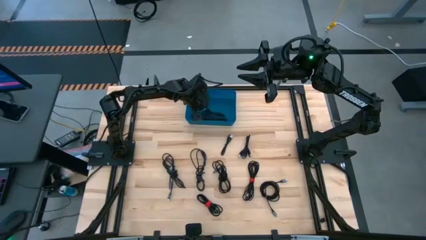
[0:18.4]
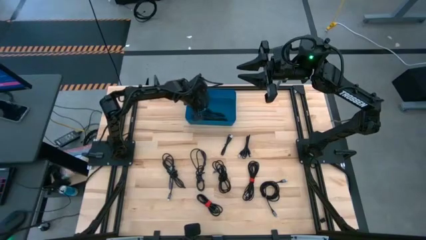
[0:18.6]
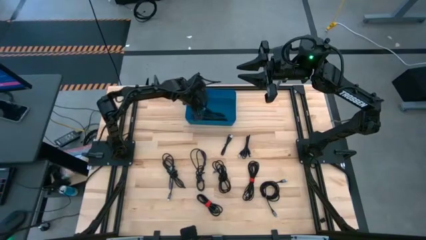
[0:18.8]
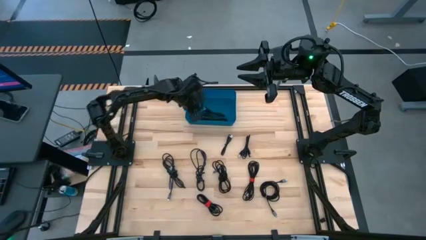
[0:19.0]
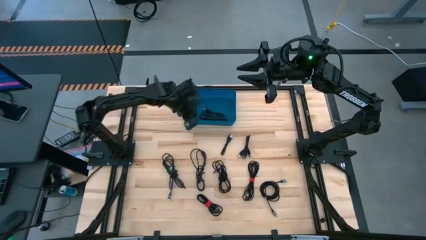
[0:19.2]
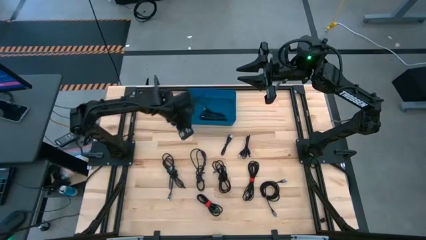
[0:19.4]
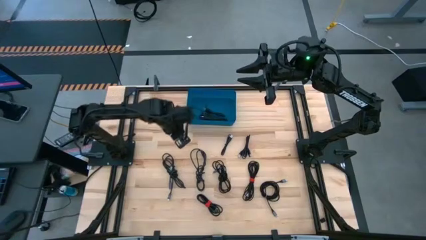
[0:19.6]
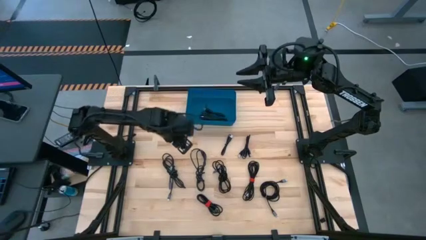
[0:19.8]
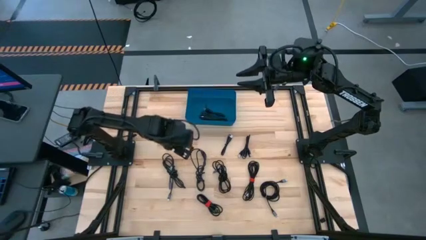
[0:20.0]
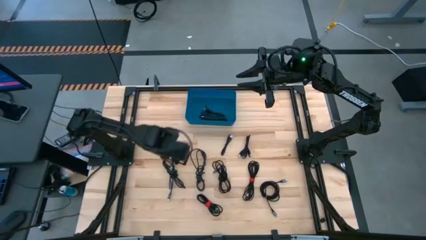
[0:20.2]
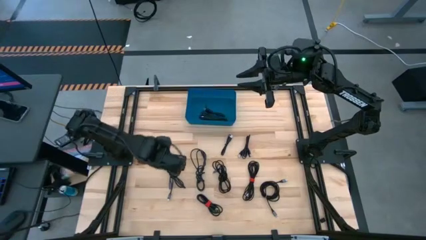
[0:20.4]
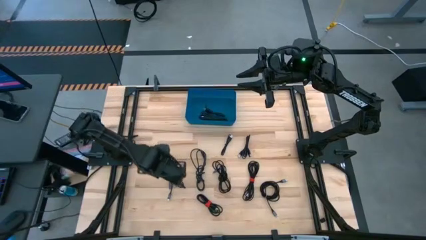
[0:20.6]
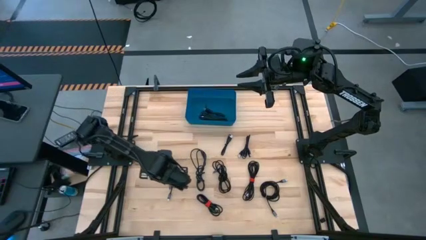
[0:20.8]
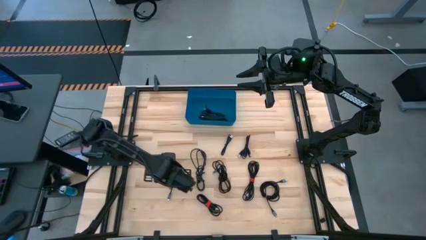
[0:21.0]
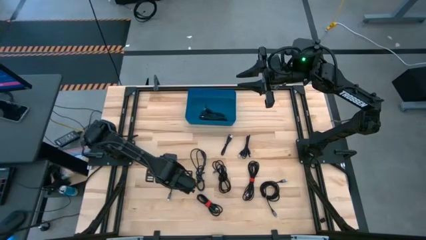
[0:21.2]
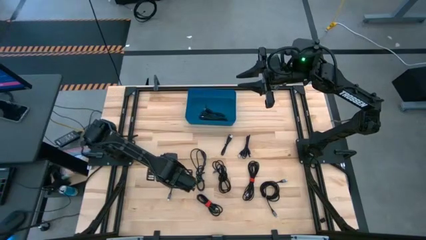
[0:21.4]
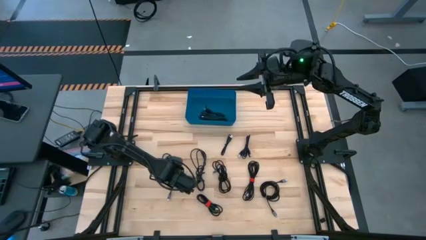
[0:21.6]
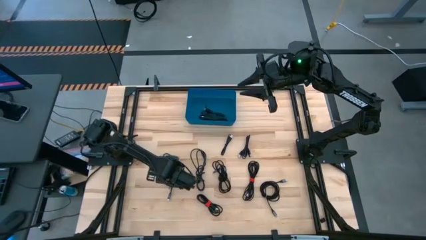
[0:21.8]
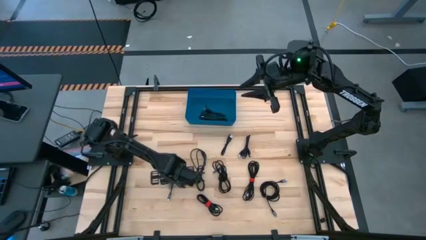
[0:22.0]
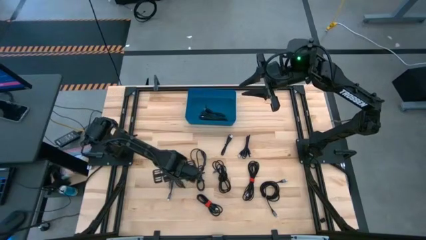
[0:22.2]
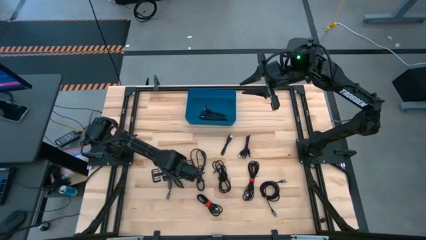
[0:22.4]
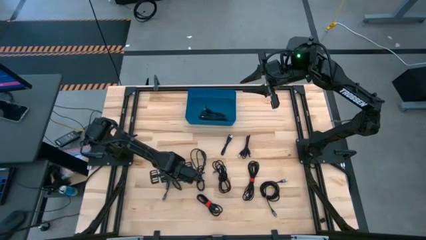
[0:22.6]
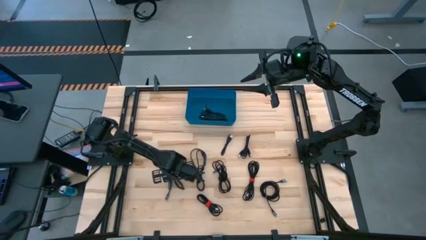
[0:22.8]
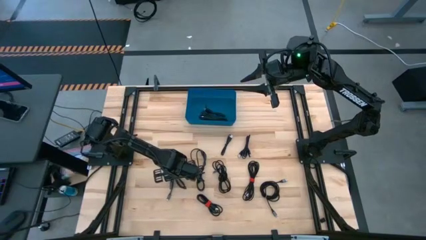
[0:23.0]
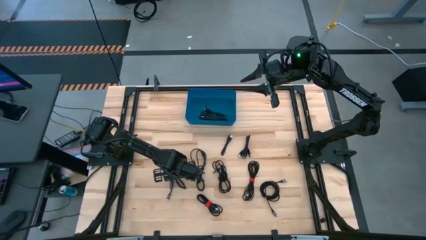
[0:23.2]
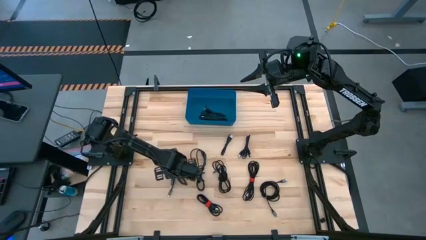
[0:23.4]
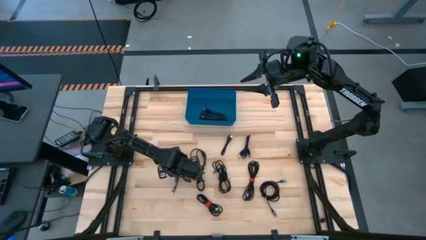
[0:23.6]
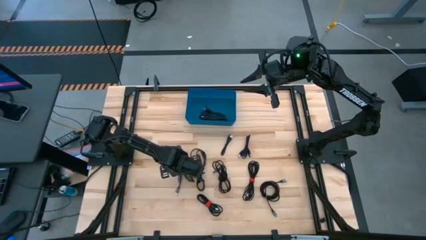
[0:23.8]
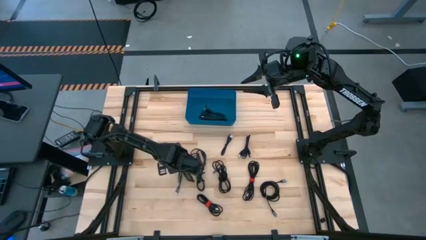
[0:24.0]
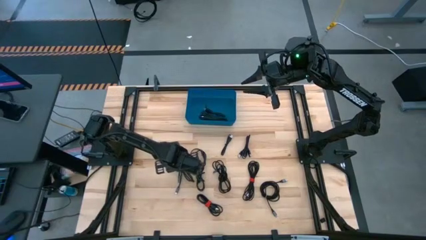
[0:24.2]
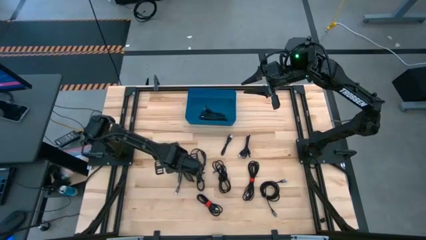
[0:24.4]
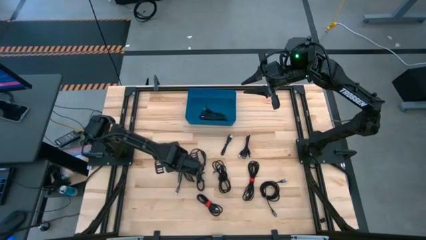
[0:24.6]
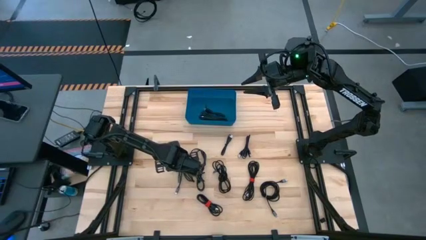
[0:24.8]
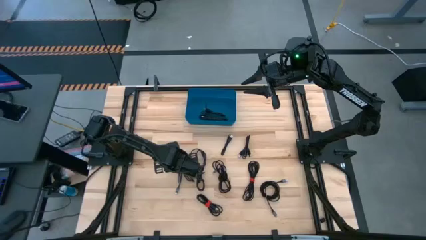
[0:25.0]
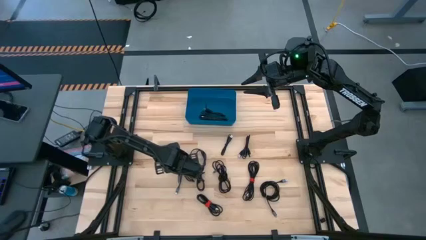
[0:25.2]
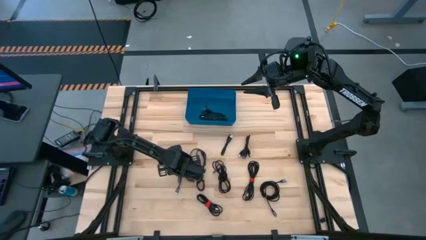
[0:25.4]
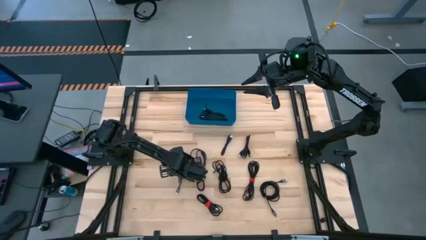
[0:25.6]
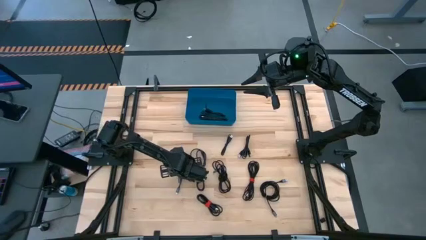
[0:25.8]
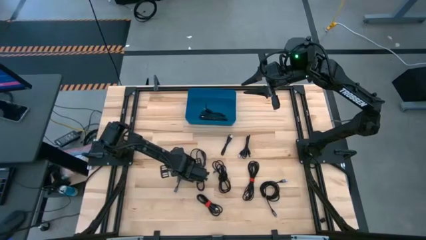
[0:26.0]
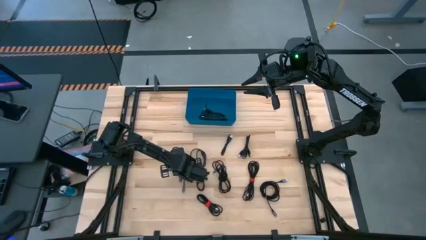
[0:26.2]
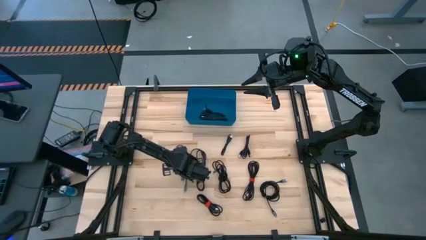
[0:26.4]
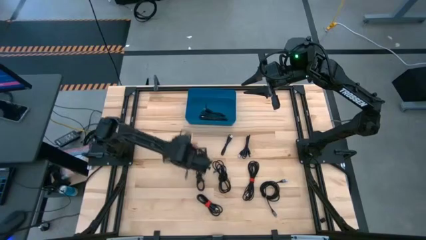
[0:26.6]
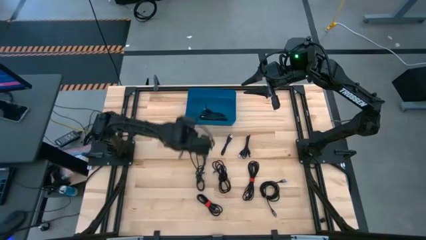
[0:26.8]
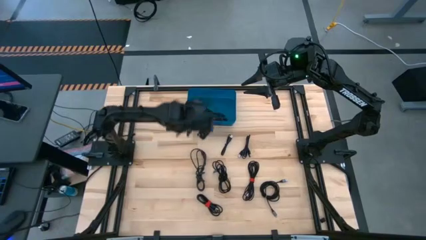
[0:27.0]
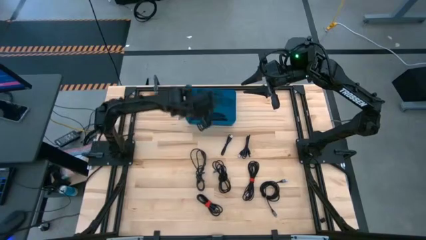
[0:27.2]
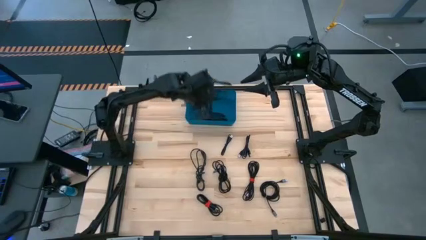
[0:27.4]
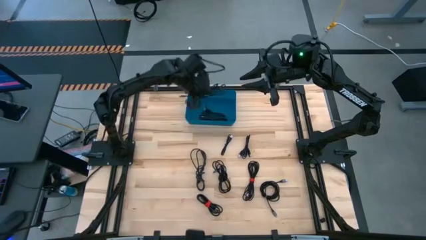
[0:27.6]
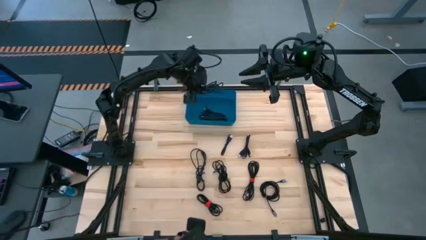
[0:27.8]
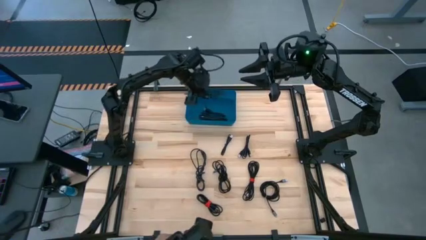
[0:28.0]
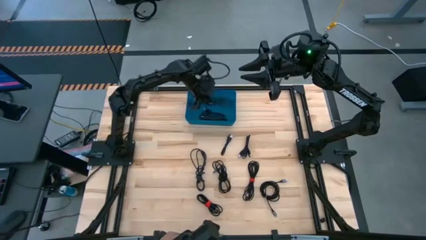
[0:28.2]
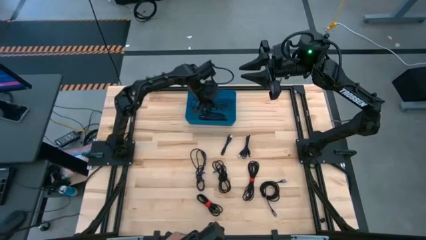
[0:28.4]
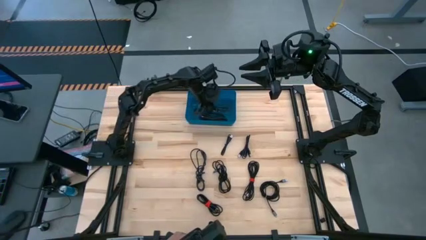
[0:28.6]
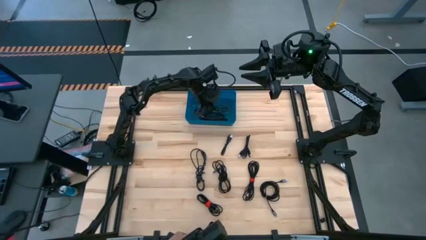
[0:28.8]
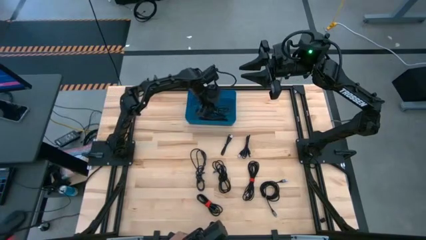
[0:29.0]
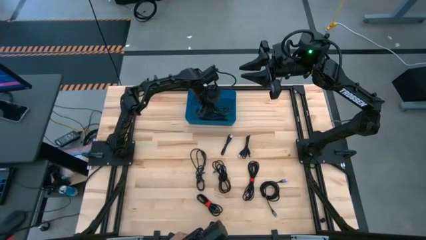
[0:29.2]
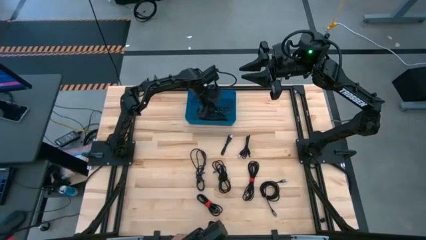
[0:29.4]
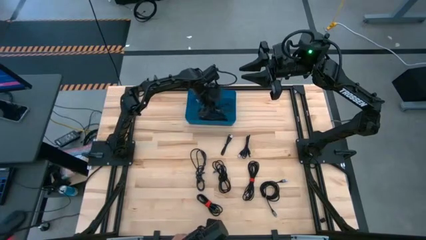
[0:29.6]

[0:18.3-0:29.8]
Task: Pick and place USB-C Cables
Put the black charger cable into the blue bin

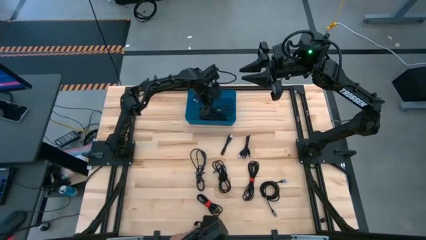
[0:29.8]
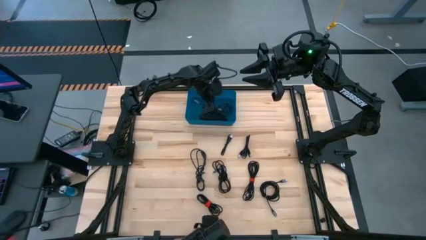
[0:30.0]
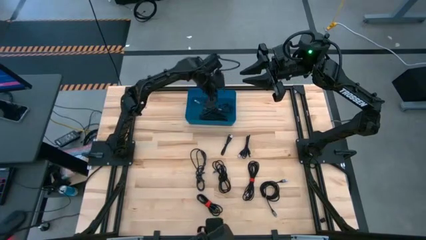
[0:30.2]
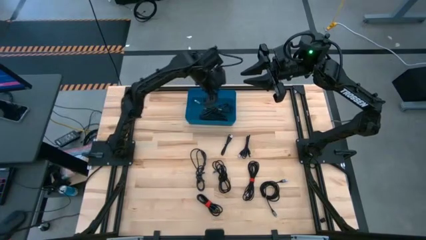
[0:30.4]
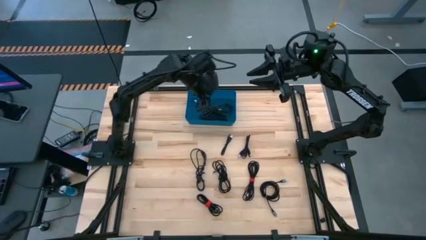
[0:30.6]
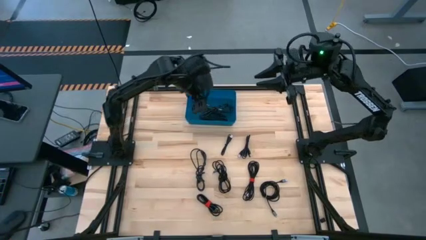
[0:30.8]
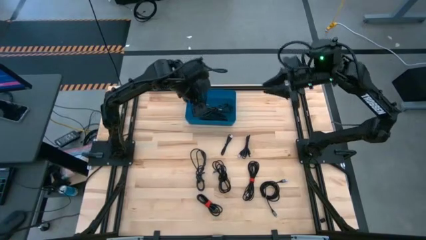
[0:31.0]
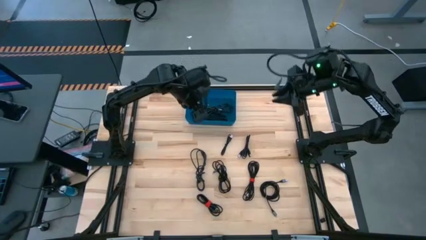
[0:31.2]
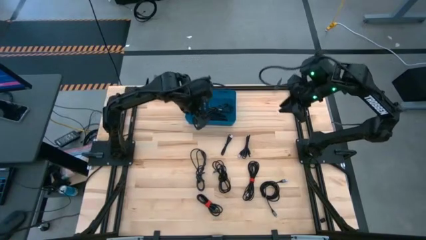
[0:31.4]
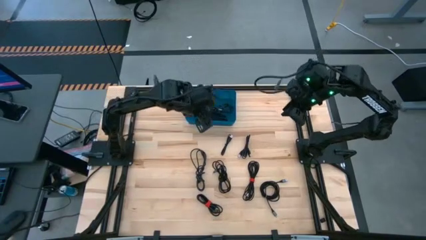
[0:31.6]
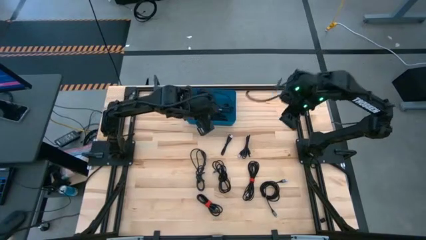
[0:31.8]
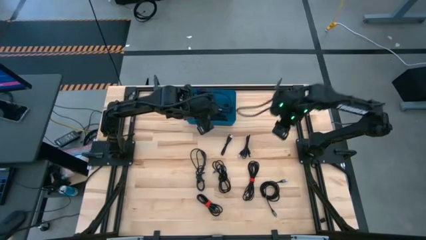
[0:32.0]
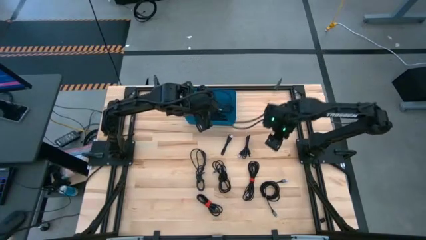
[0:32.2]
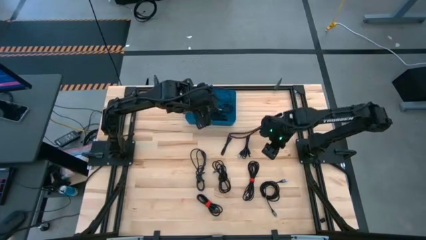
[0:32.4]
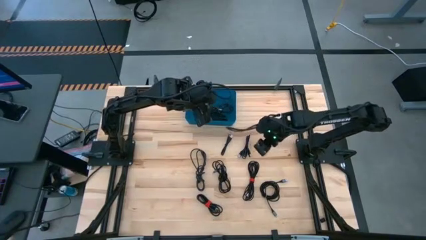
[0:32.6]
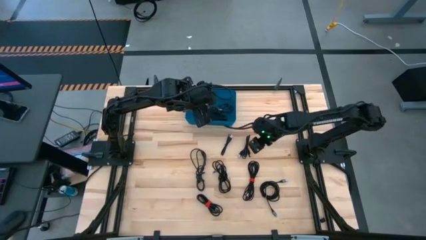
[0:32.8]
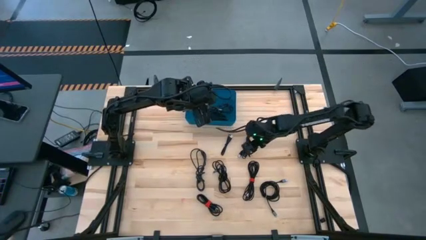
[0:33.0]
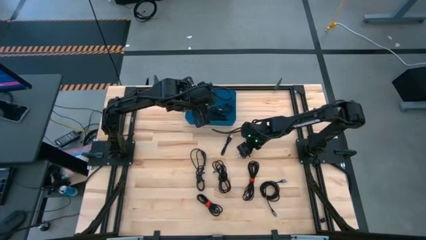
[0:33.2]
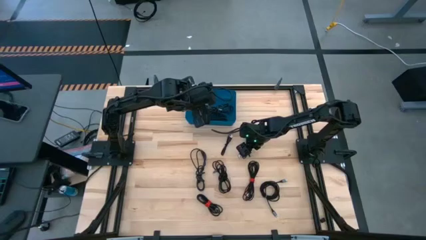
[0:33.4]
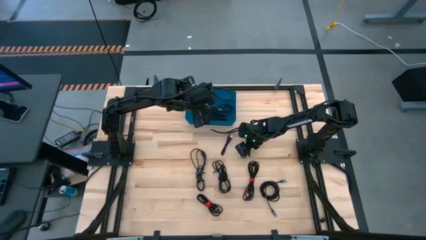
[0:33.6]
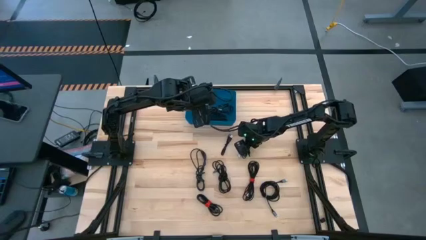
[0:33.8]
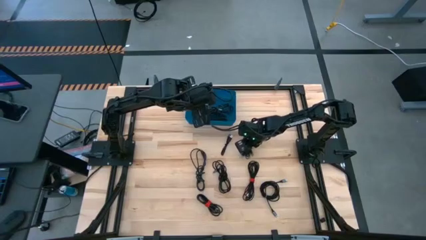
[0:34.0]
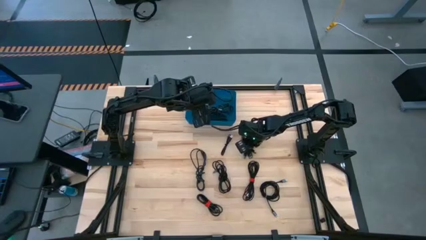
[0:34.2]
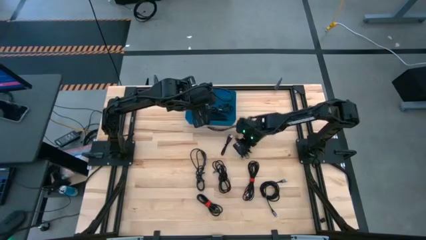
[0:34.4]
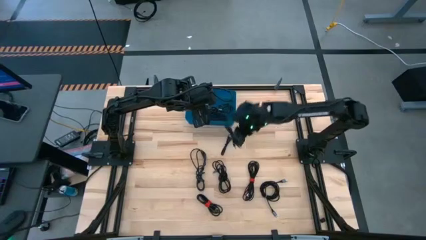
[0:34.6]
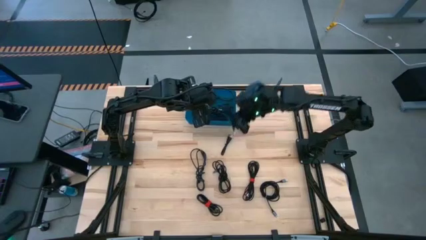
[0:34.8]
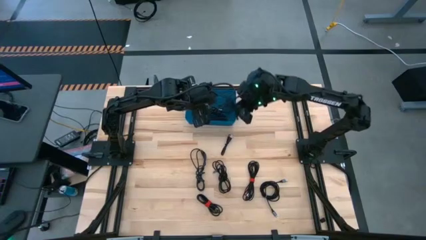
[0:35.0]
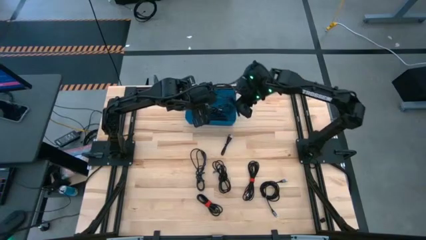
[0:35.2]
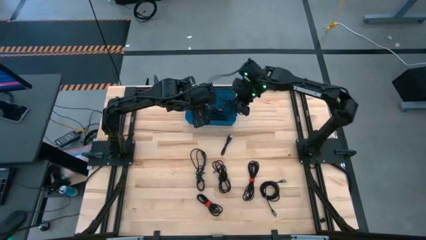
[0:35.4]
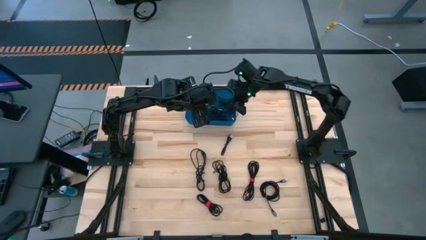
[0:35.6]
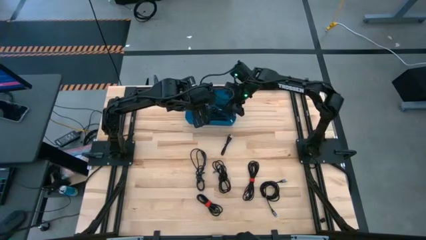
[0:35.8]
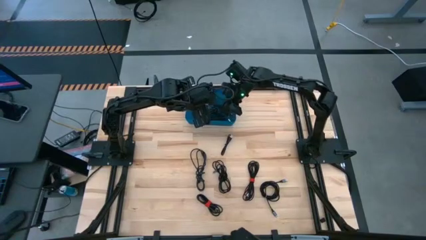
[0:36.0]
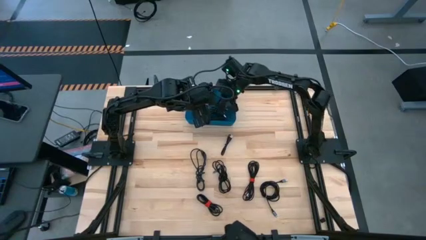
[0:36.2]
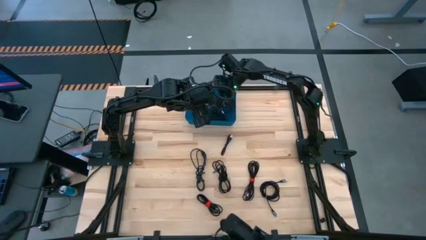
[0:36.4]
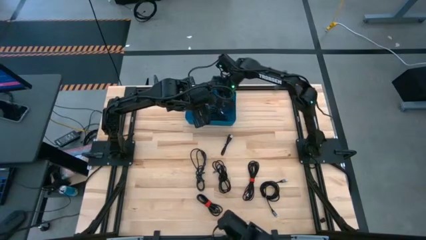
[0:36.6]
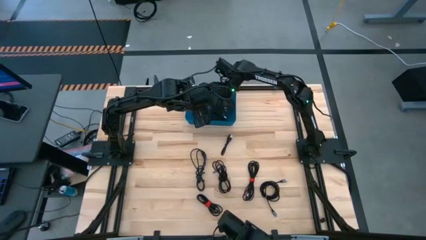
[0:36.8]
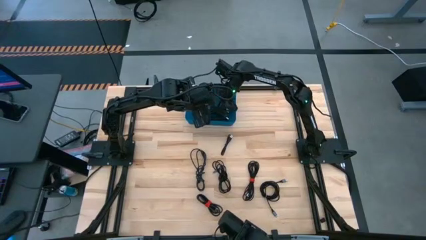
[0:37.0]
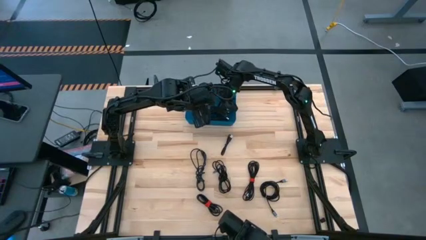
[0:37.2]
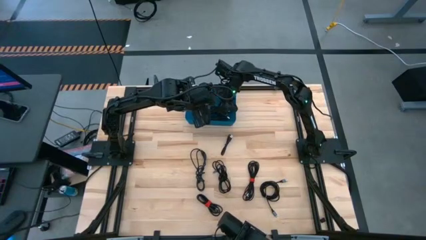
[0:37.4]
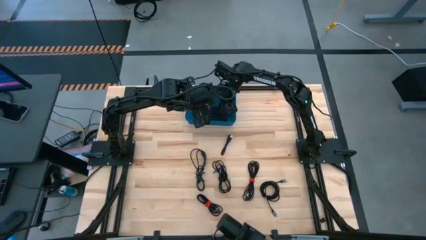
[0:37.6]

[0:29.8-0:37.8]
Put the black charger cable into the blue bin
